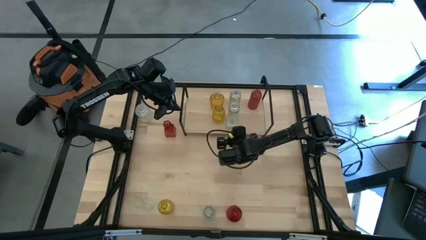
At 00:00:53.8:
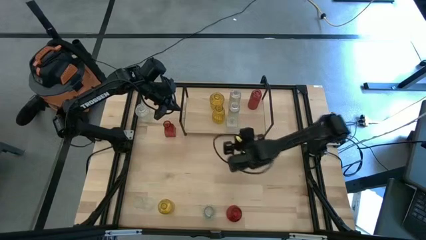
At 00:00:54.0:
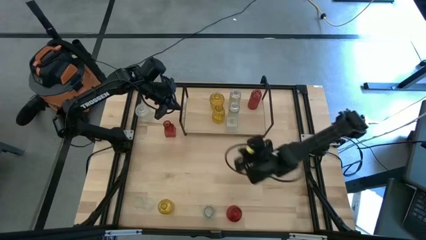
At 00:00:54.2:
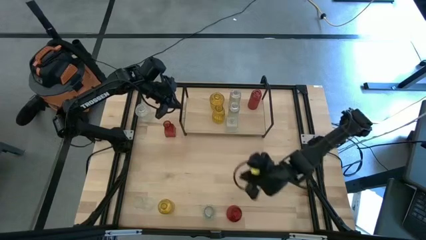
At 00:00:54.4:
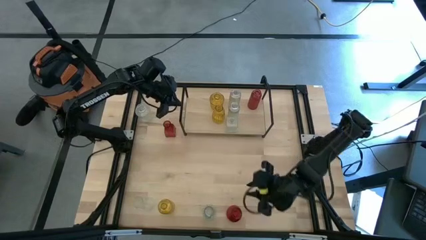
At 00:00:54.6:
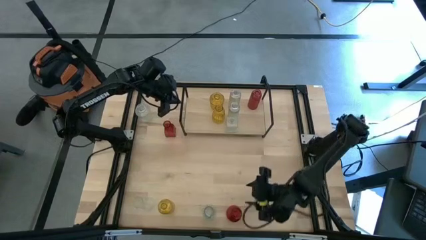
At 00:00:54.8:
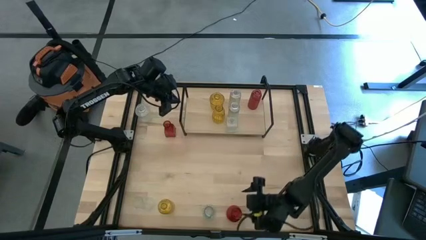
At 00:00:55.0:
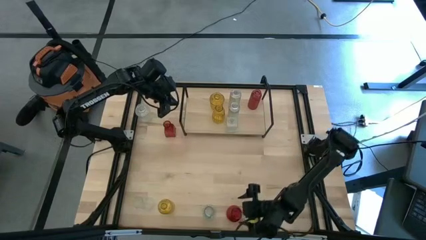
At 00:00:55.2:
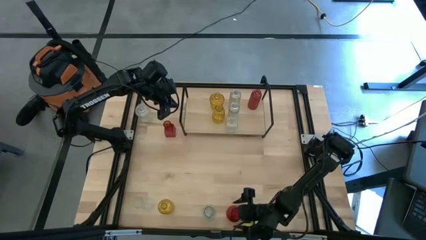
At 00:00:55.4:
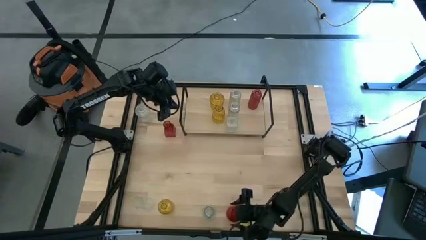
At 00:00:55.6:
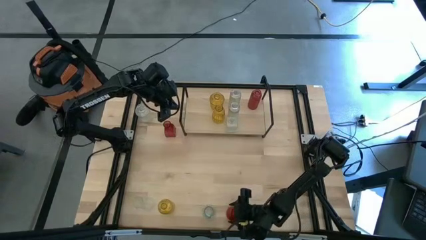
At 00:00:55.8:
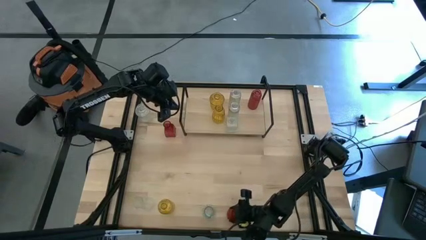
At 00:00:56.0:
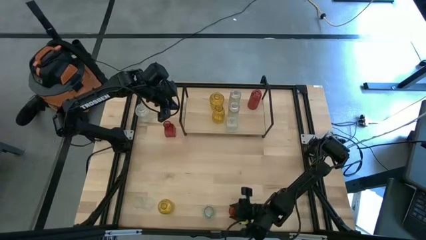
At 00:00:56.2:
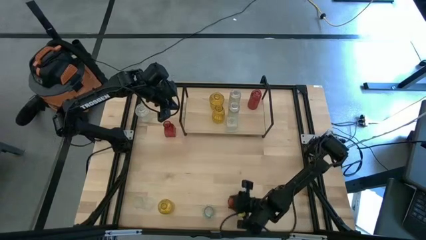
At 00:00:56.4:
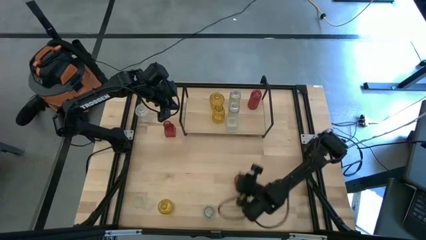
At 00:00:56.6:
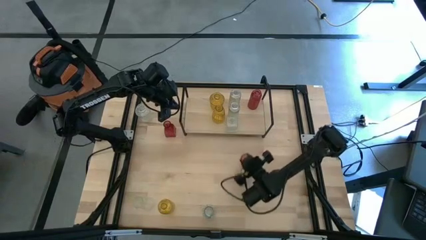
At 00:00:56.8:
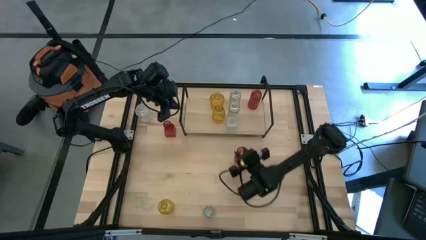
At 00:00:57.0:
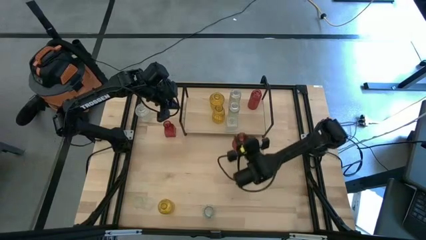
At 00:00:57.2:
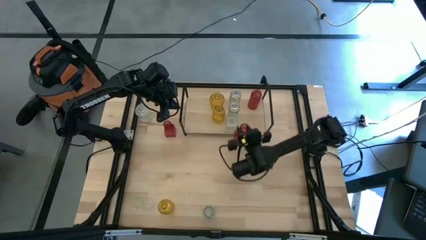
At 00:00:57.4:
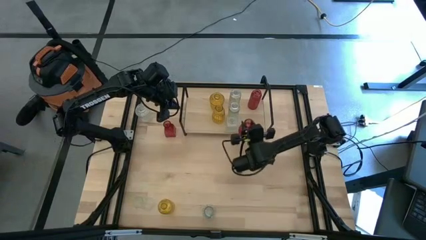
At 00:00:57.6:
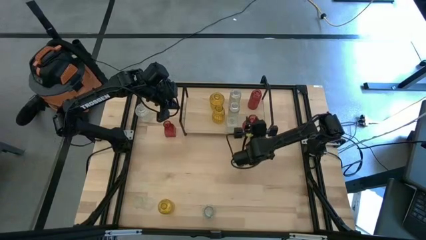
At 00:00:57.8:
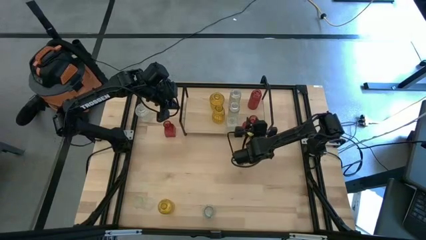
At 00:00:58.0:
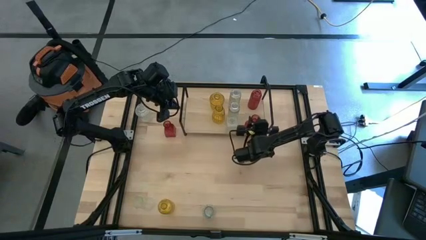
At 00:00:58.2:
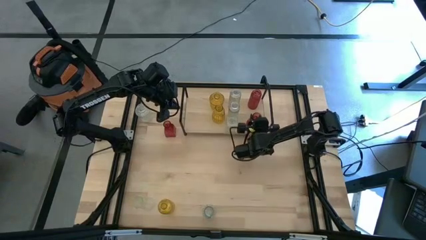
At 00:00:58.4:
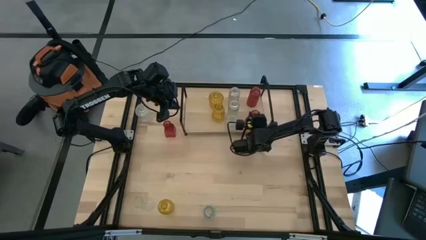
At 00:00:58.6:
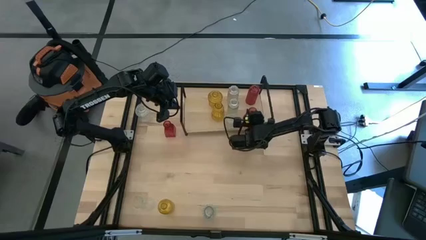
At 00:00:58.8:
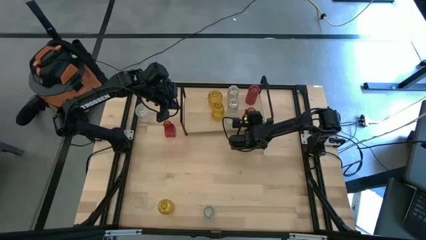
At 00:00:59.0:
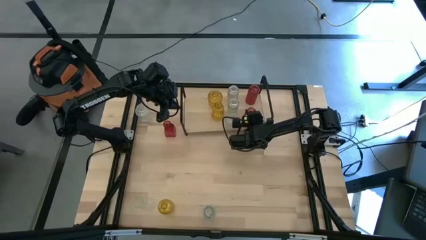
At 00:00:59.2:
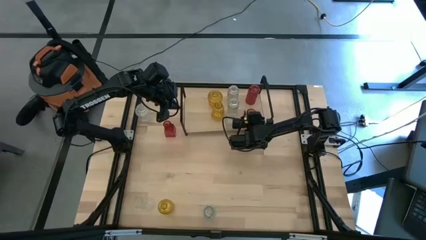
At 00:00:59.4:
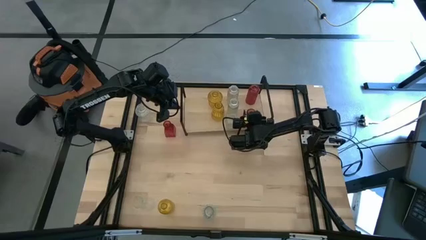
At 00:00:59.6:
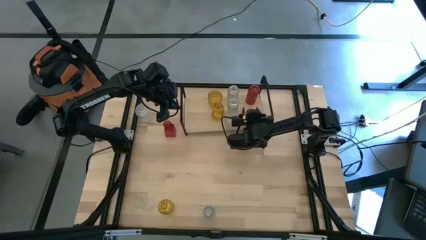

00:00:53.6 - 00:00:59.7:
Task: sort vases onto shelf
Put the red vase on the shelf aligned with the other red vase

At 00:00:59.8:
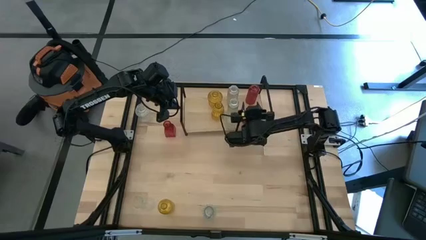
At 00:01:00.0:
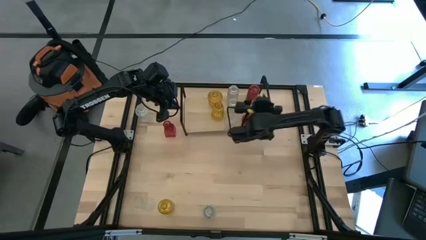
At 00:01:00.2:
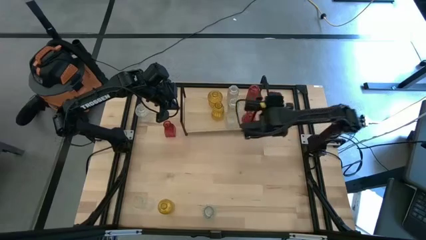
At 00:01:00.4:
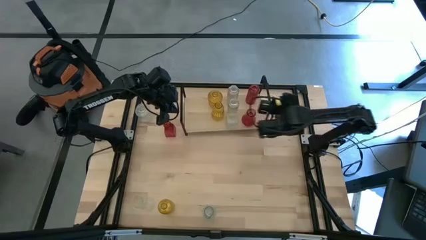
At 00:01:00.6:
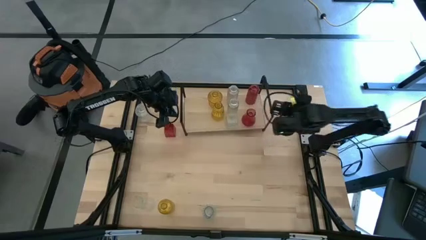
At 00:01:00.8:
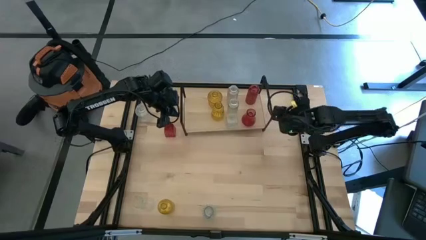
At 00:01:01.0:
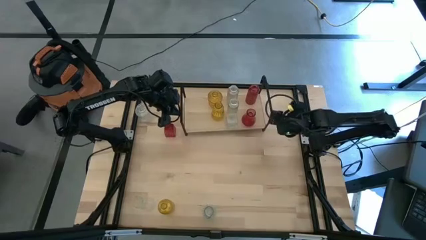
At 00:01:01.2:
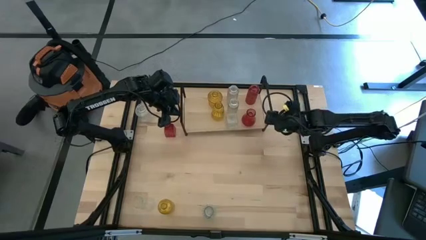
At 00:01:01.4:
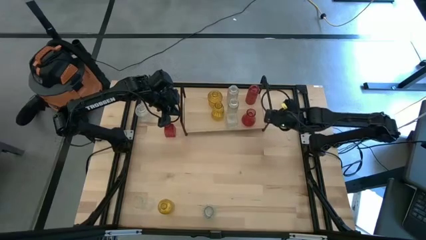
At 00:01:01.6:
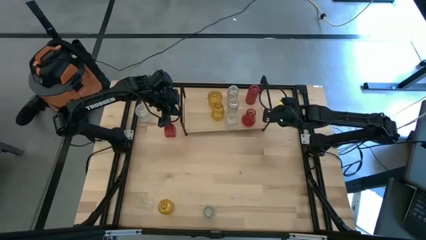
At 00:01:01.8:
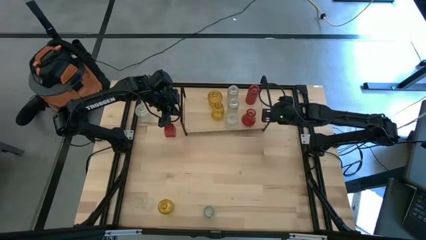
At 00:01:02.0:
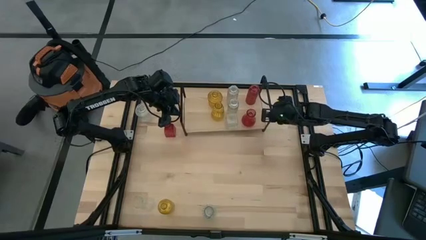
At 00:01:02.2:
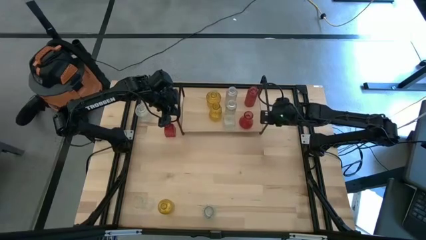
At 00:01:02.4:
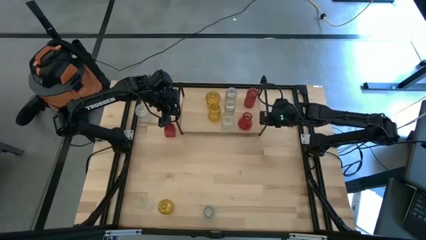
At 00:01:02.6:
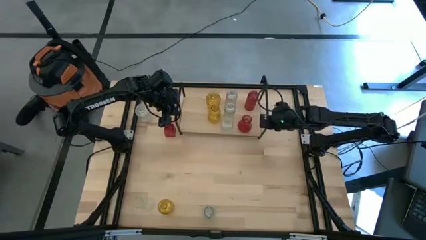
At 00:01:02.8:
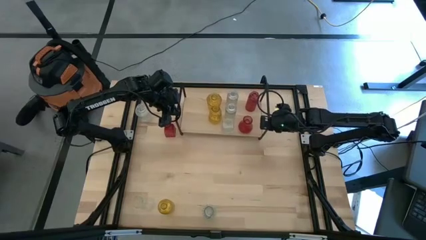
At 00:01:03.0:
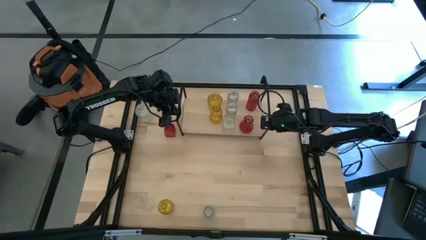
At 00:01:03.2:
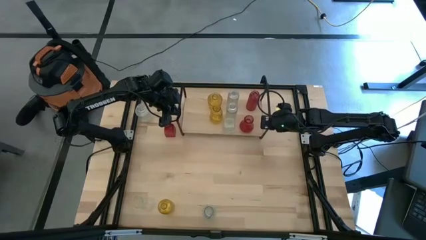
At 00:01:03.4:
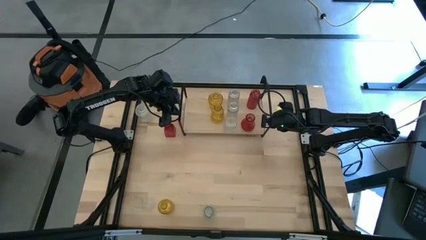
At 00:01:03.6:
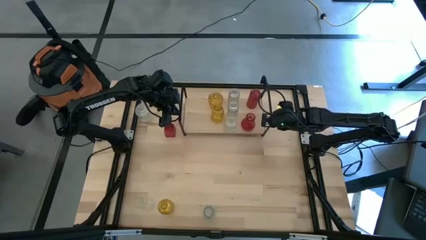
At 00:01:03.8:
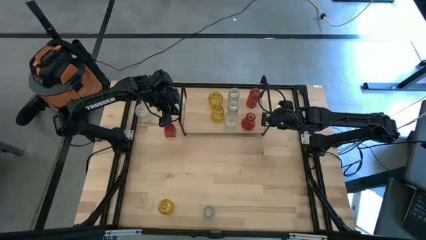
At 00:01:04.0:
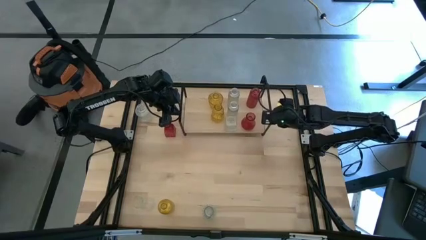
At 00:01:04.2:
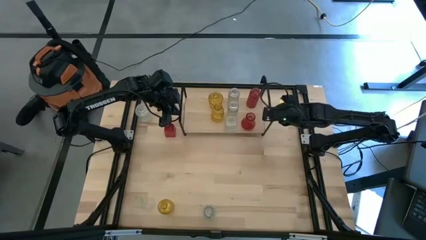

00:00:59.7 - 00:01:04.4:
Adjust the shelf

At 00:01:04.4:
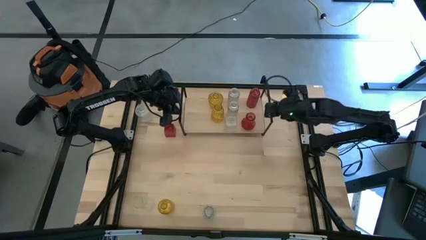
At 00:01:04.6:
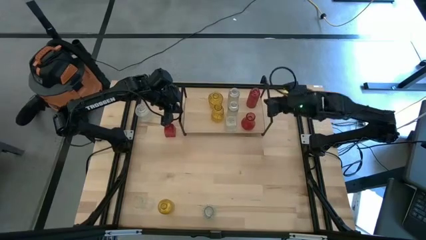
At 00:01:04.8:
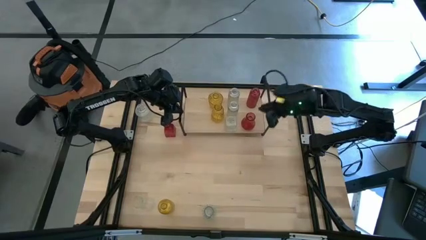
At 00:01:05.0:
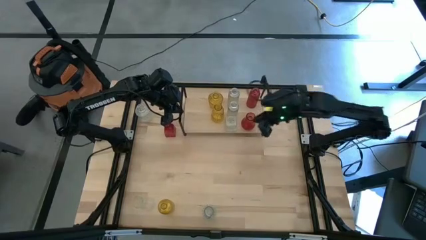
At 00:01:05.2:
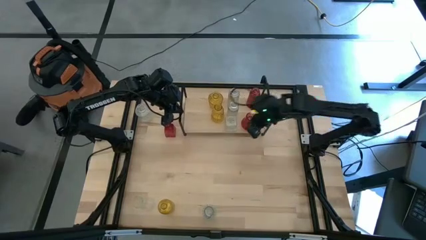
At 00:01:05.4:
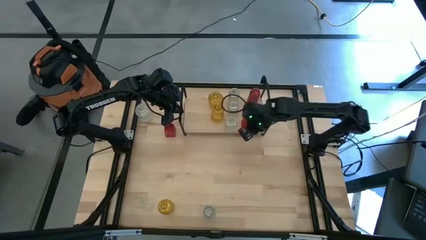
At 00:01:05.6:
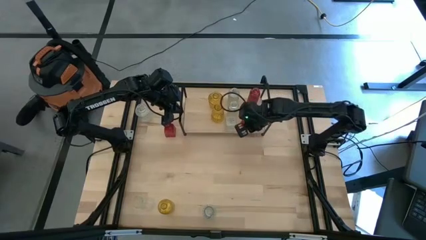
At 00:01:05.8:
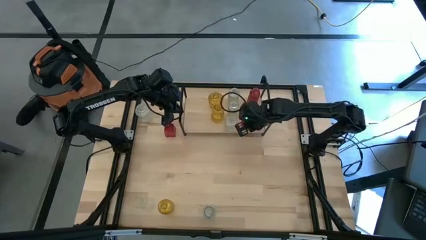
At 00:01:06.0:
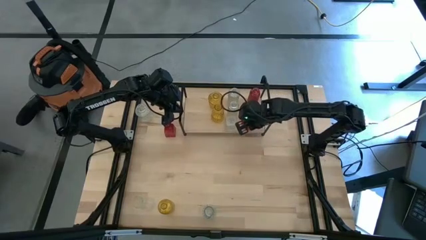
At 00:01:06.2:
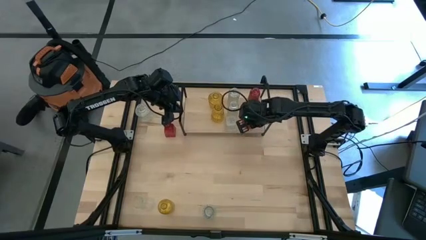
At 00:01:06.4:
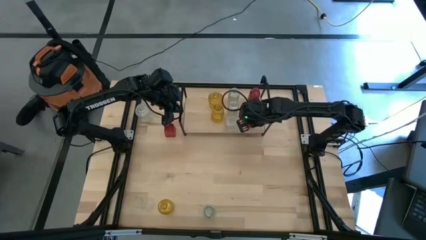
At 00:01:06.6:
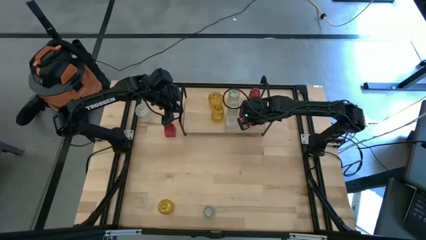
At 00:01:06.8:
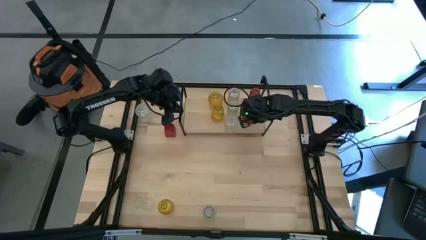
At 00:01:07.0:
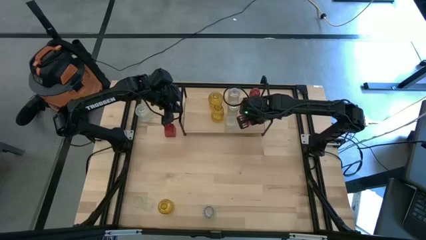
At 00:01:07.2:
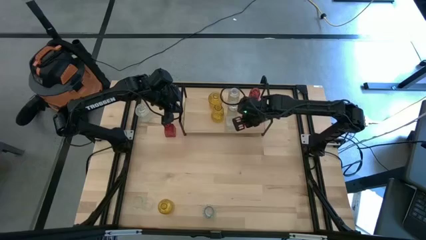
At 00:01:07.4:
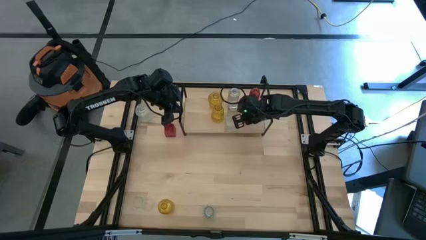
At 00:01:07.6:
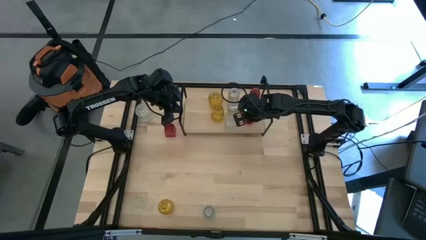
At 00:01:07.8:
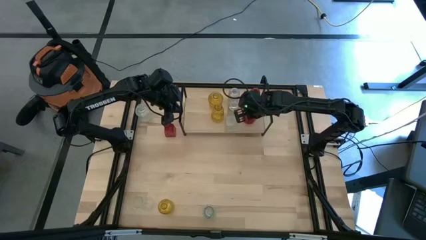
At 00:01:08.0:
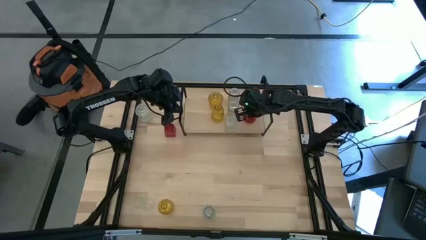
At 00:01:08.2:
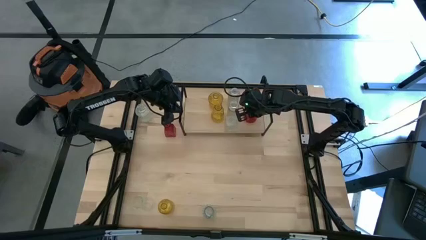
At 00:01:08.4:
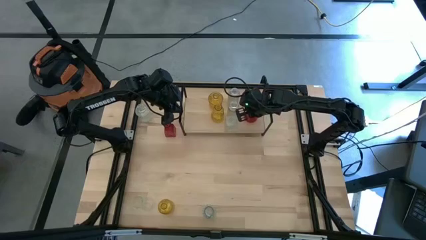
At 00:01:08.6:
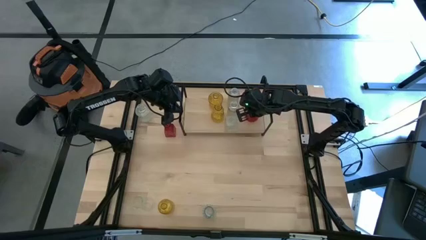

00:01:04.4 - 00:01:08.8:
Adjust the red vase on the shelf

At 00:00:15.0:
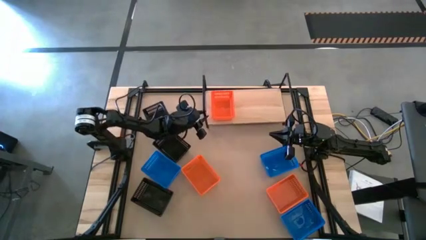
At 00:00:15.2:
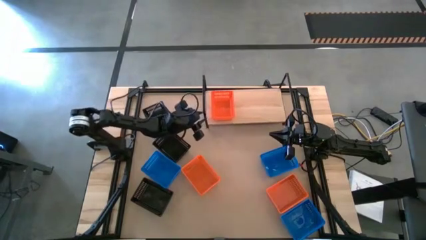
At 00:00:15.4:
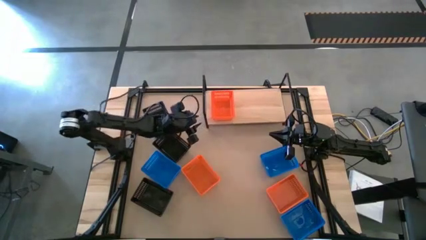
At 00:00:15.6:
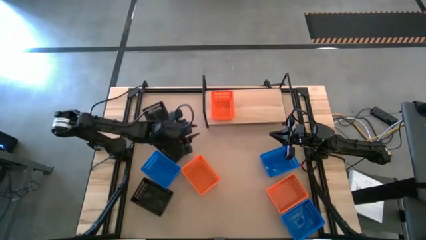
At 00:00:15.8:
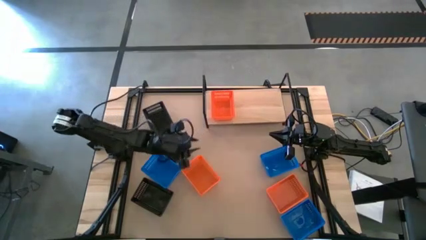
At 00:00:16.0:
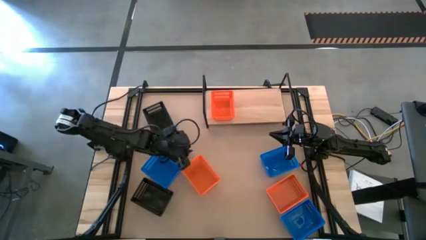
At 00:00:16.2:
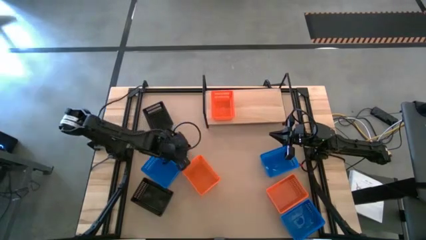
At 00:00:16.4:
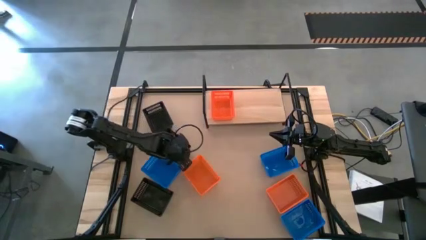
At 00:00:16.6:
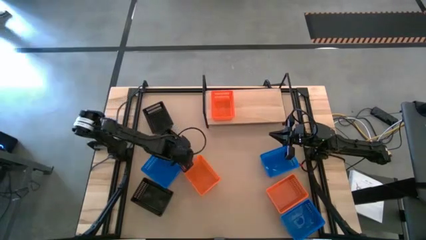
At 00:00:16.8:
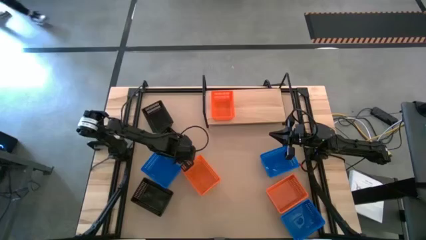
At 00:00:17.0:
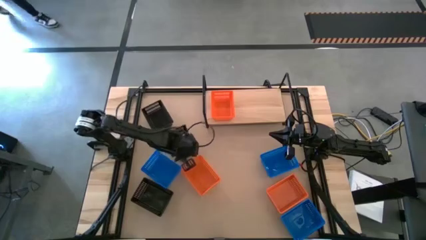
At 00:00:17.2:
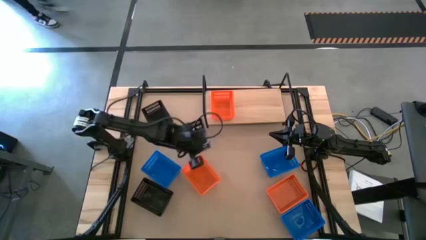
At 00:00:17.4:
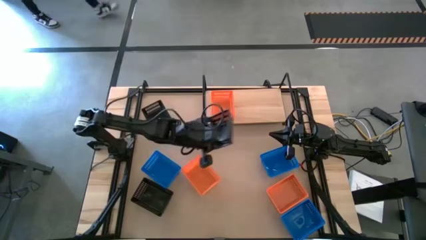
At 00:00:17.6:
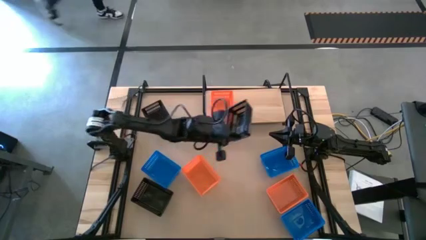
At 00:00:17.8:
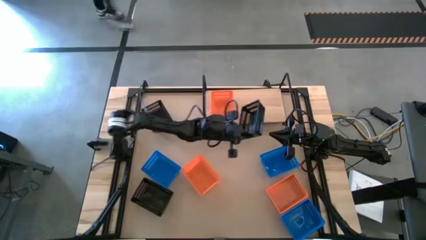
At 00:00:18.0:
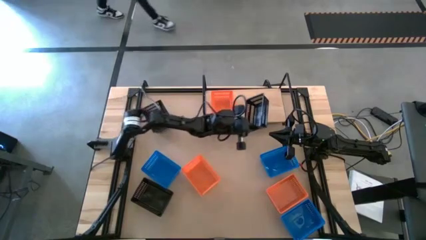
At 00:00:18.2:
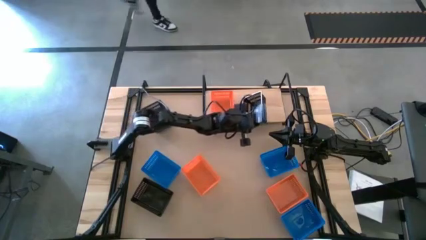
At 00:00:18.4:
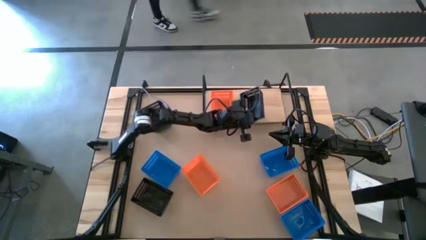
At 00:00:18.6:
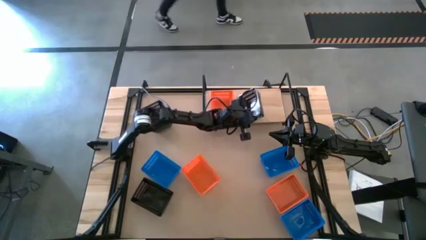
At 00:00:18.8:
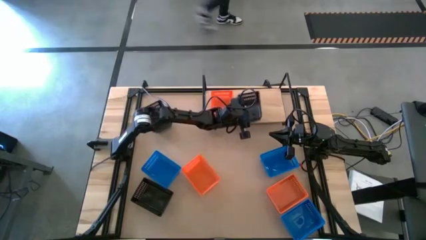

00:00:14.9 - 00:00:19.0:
Task: Stack baskets on shelf by color
Put the middle black basket on the shelf
